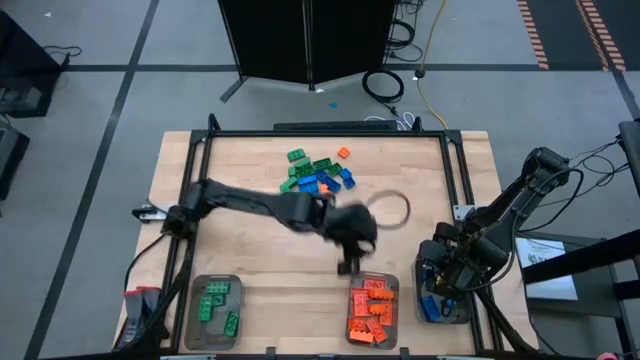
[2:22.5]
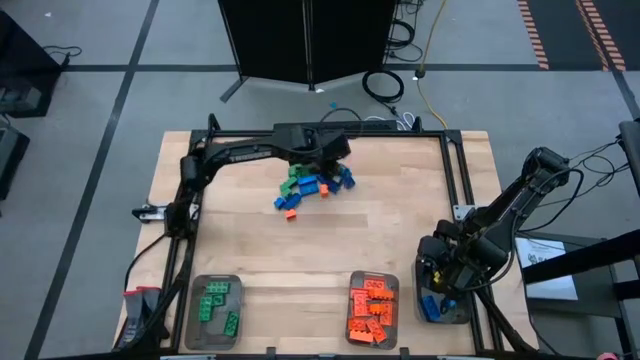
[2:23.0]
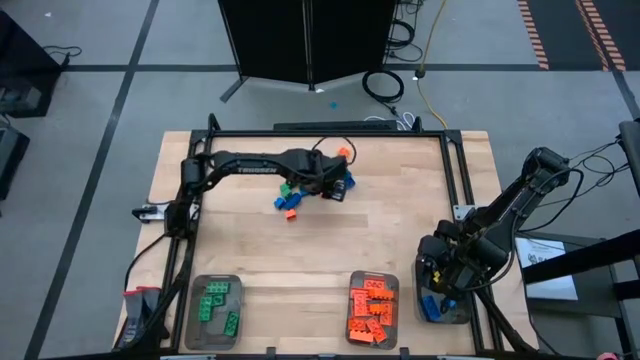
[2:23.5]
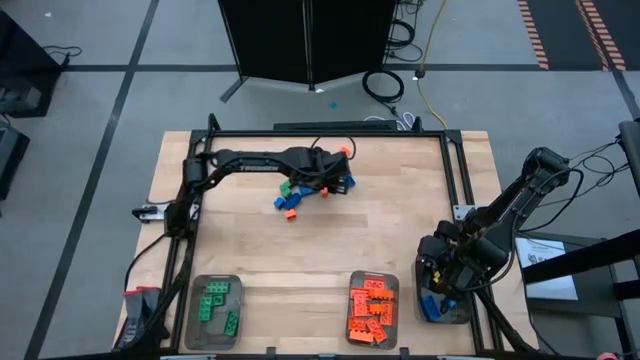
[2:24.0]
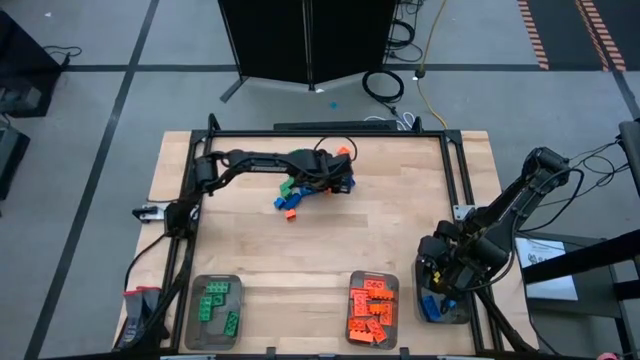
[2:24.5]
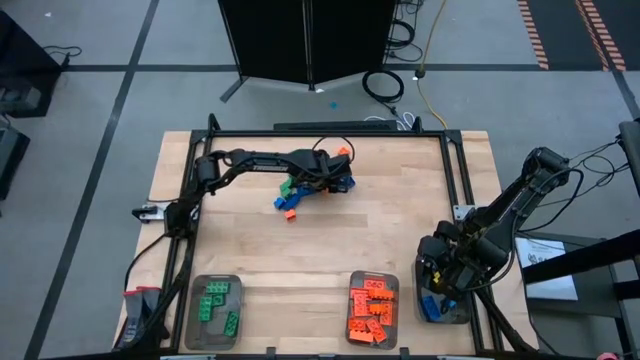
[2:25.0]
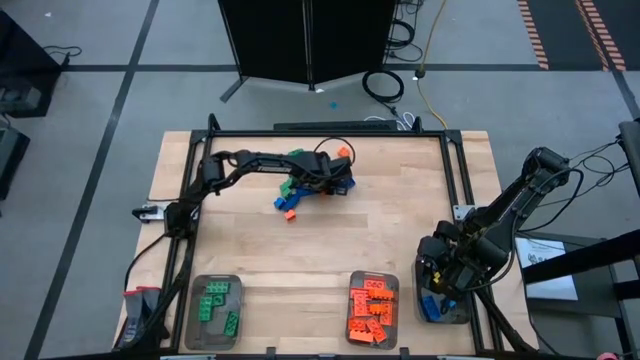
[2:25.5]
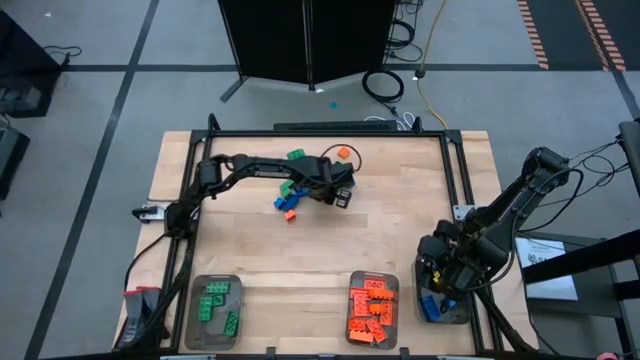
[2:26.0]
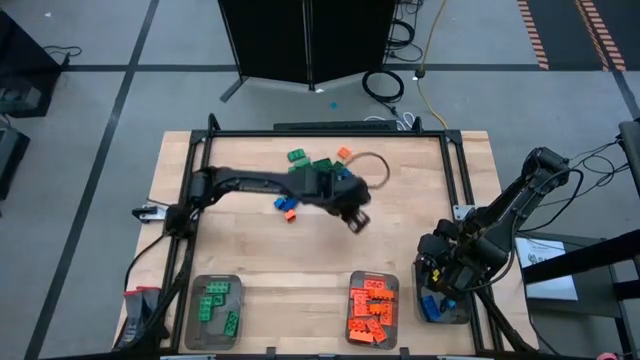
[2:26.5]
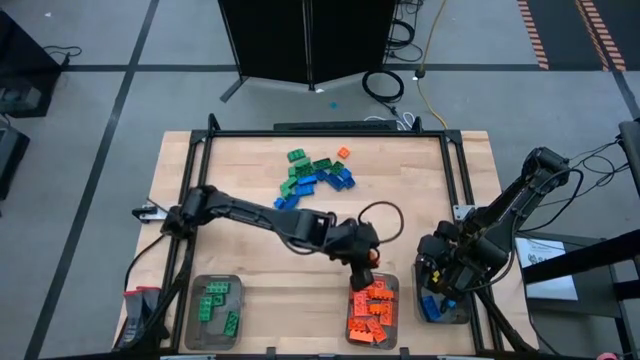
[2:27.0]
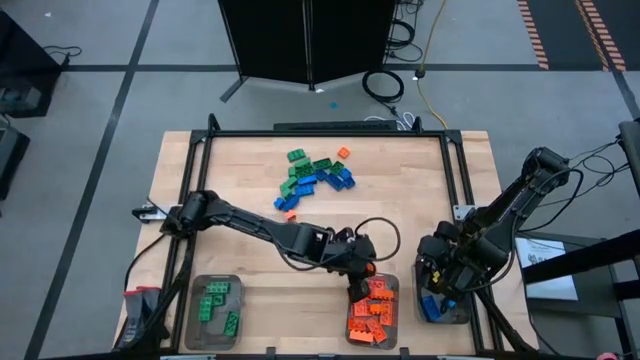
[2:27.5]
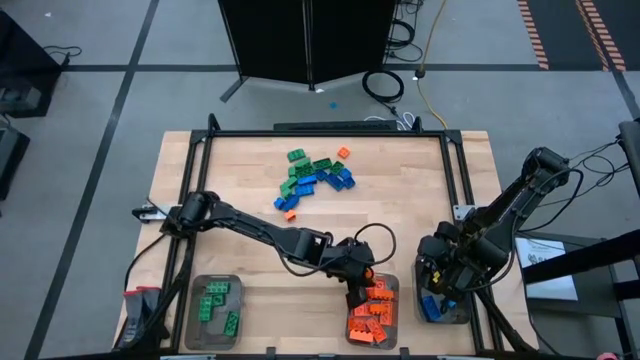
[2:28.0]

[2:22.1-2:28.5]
Task: Sort blocks
Put the orange game piece into the center black bin

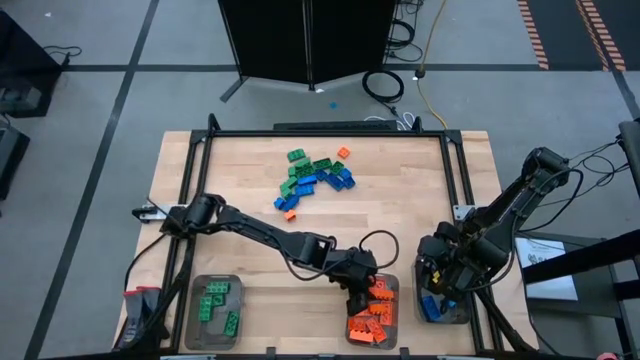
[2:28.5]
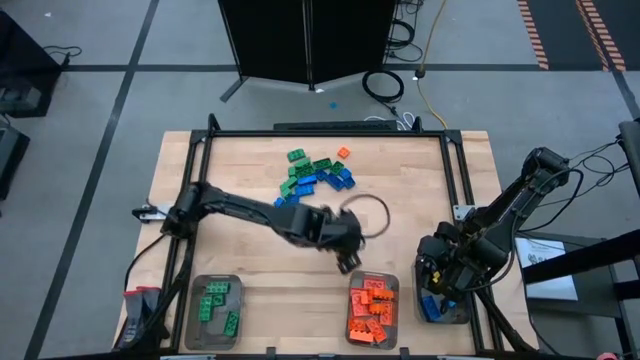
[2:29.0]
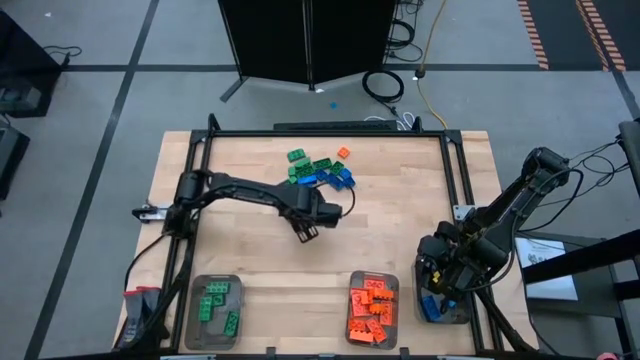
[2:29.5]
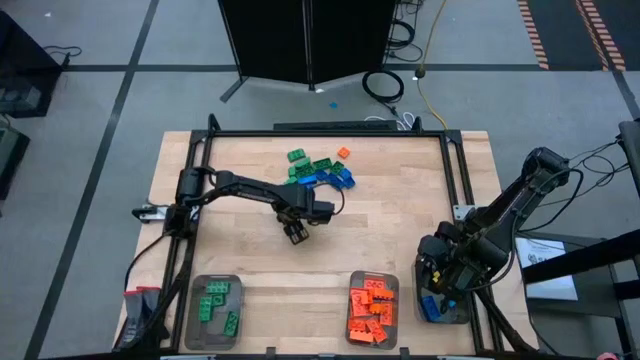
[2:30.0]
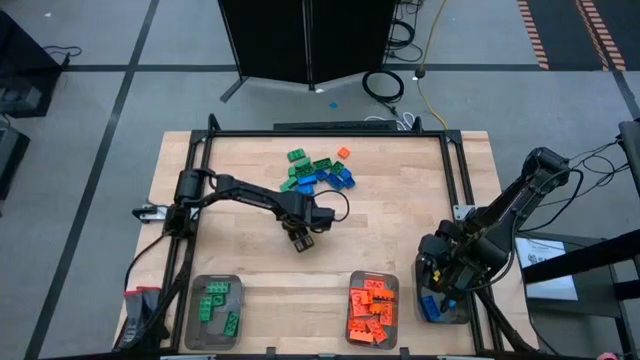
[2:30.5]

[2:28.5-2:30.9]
Put the orange game piece into the center black bin

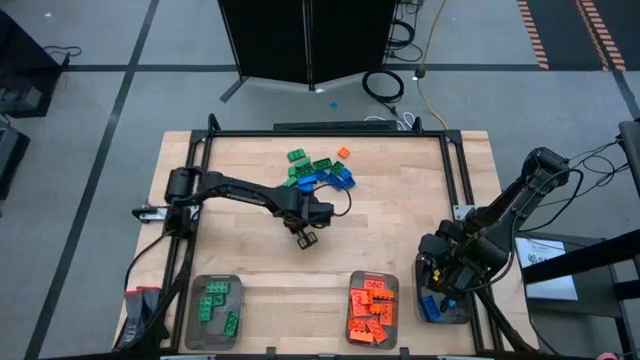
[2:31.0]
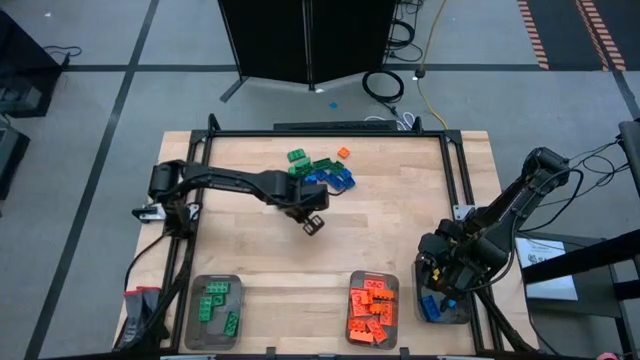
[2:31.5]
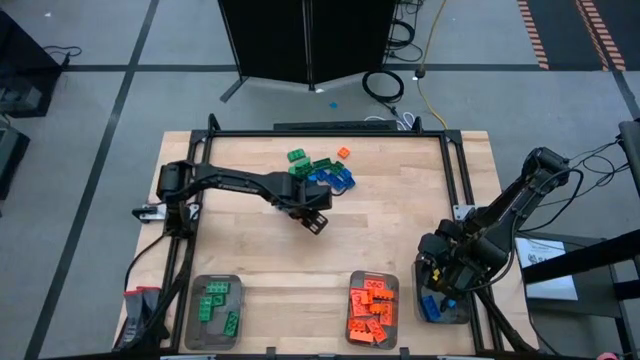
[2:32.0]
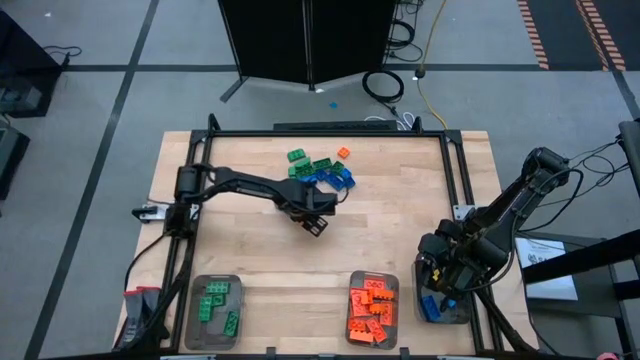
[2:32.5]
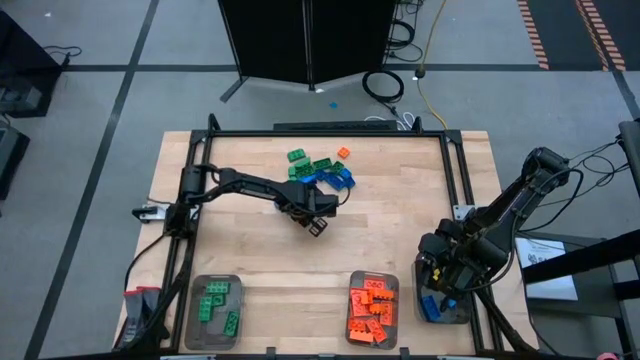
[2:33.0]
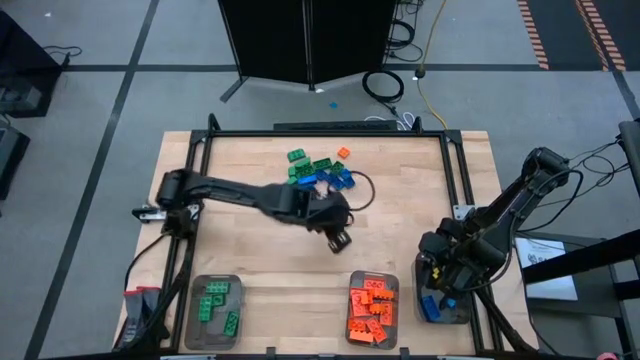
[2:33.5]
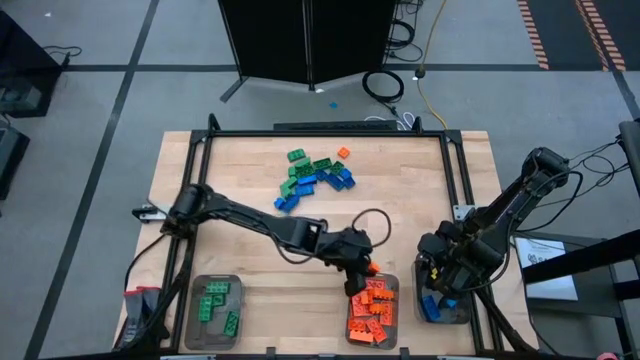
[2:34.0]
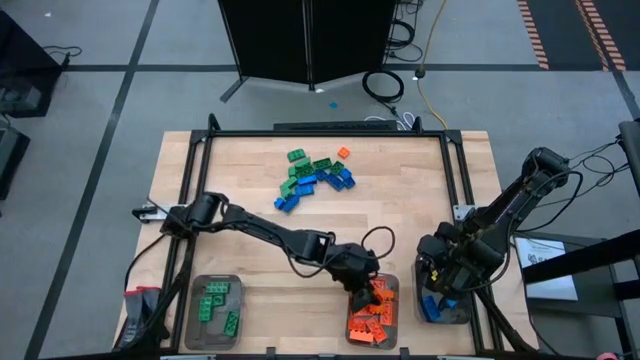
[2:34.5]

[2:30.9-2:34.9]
Put the orange game piece into the center black bin

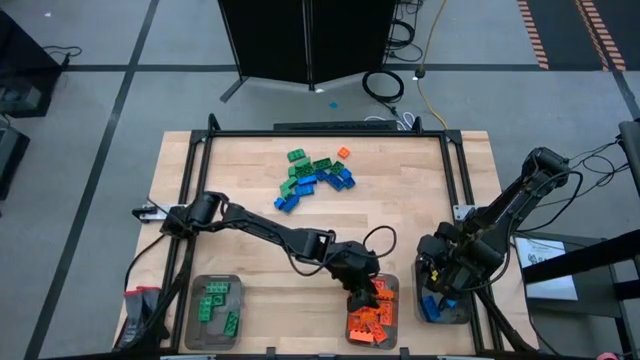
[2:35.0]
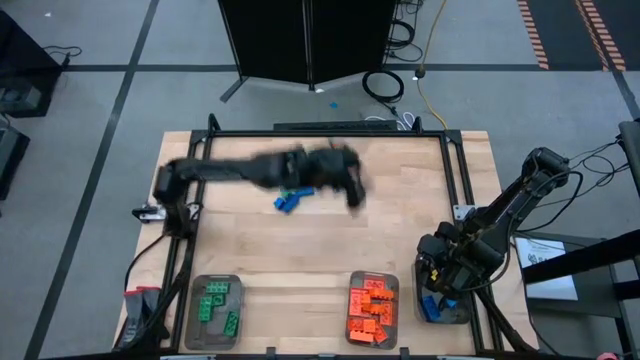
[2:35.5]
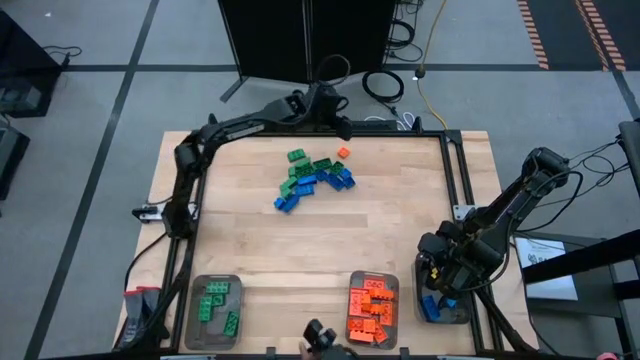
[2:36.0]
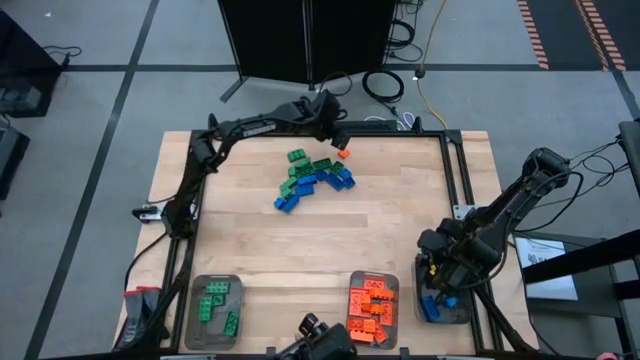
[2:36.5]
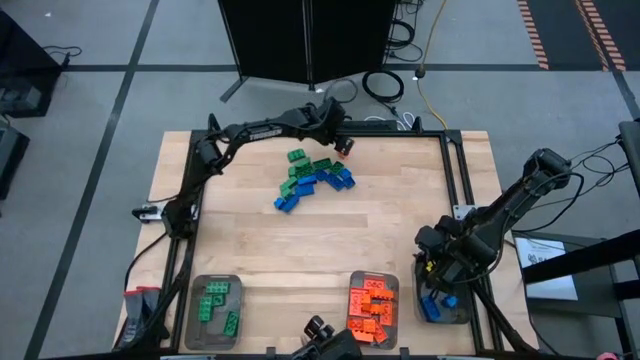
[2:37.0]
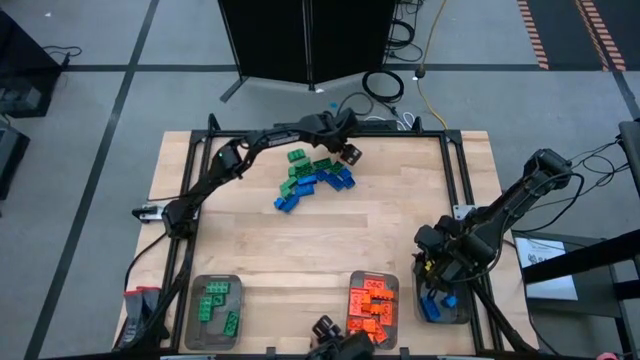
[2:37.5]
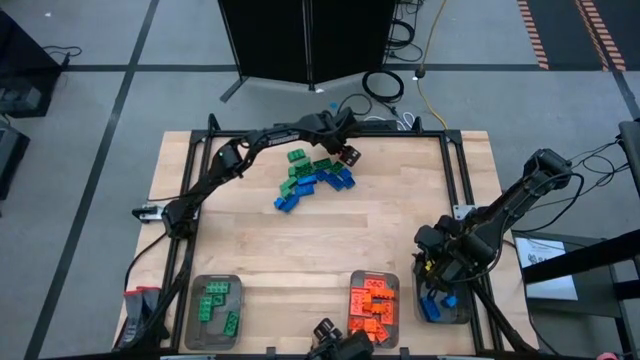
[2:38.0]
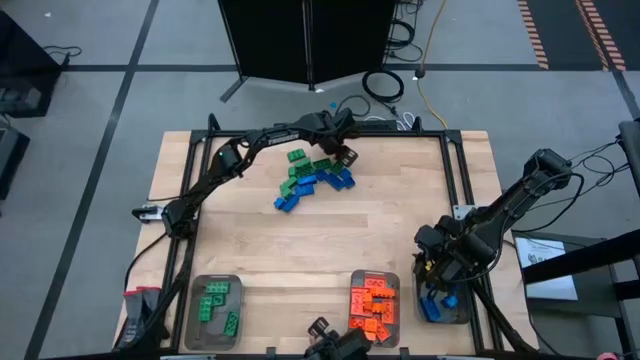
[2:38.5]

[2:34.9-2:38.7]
Put the orange game piece into the center black bin

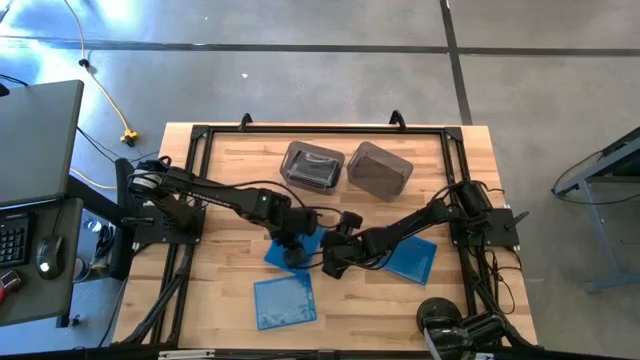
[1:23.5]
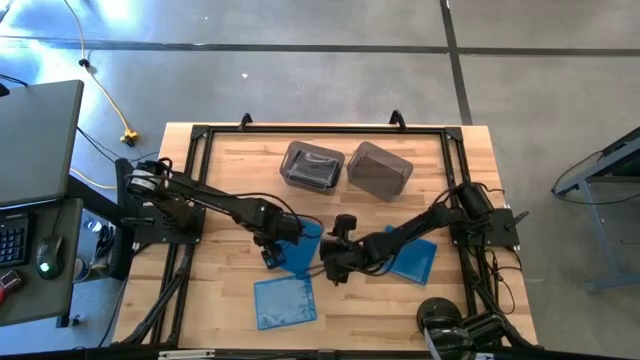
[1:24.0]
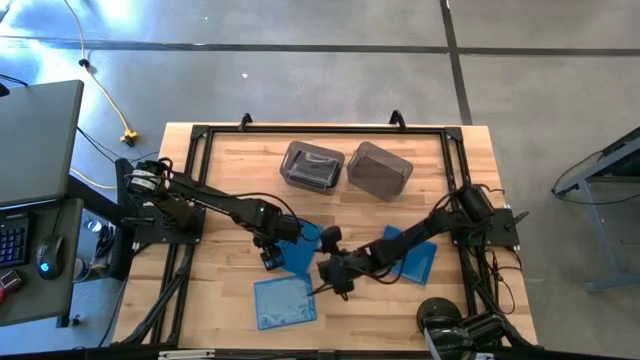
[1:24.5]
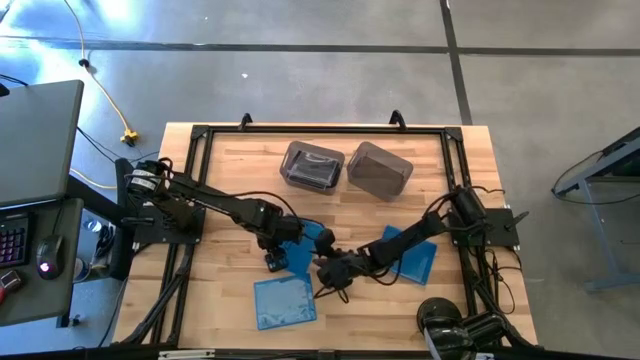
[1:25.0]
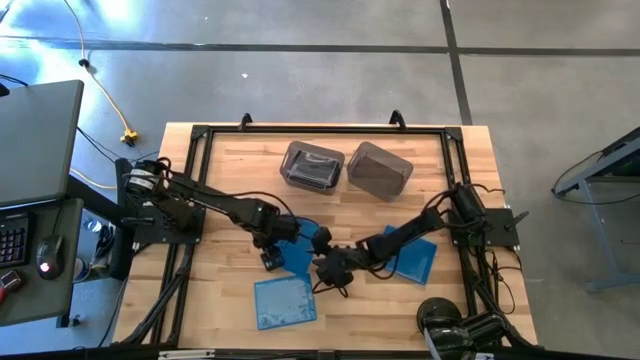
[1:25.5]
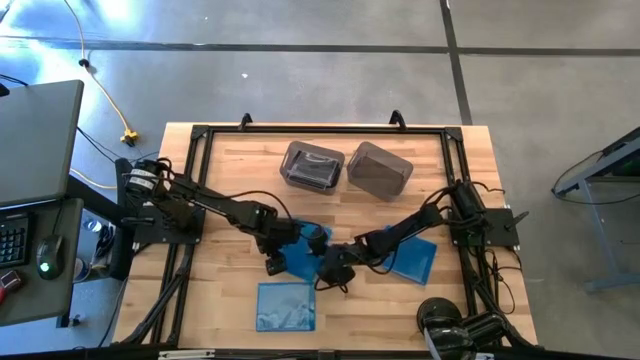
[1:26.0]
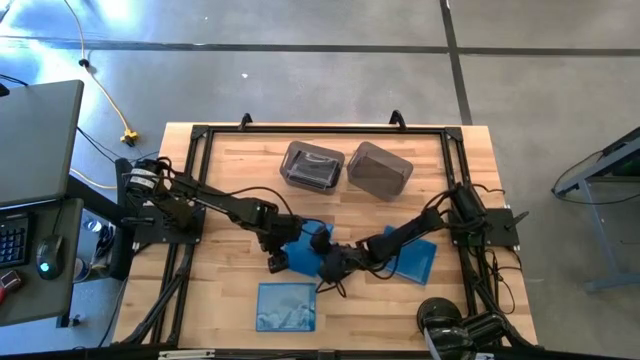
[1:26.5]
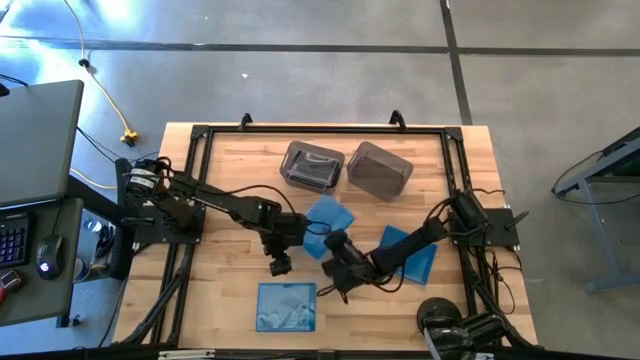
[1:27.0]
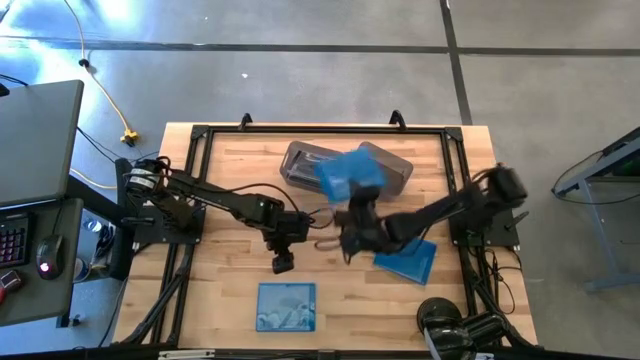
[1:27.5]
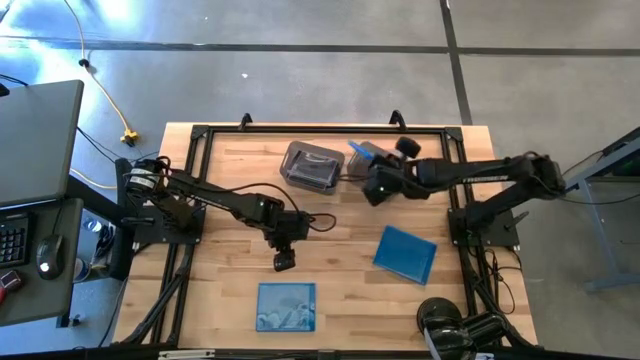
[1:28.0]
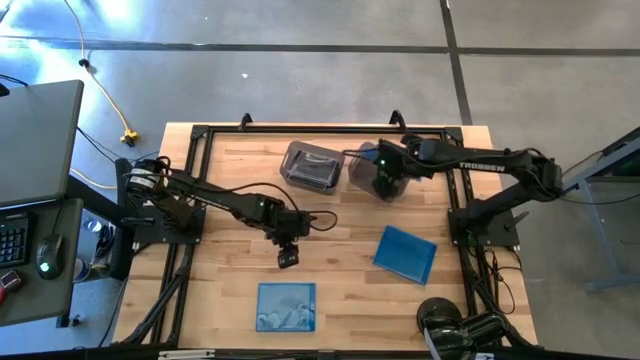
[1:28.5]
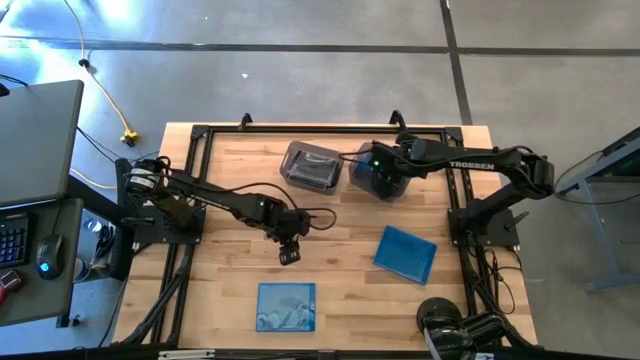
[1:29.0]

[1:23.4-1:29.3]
Task: Pick & place jewel cases by type
Put the top left blue CD case into the right black bin
